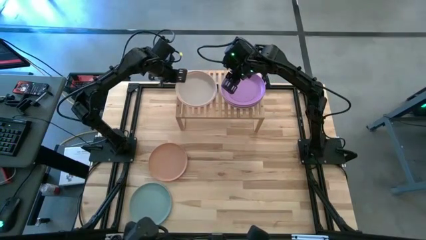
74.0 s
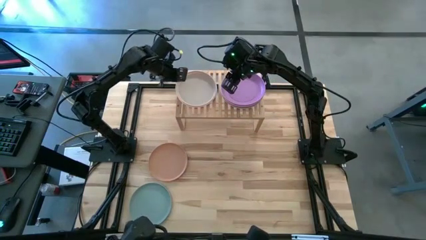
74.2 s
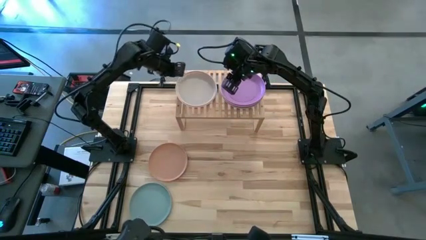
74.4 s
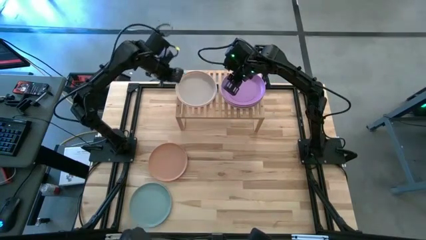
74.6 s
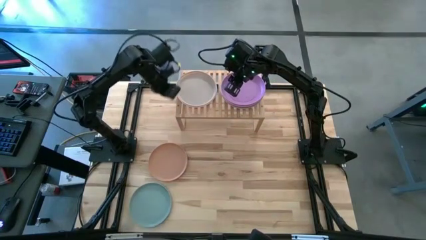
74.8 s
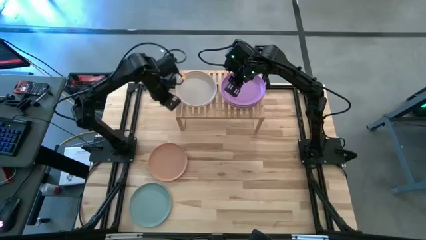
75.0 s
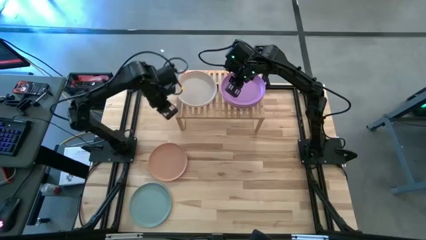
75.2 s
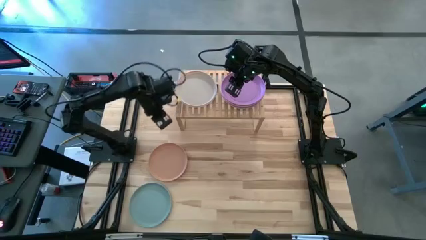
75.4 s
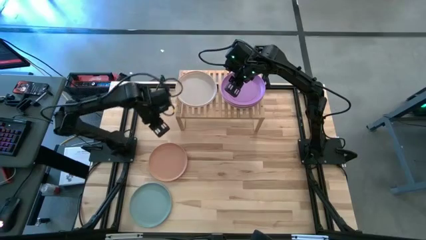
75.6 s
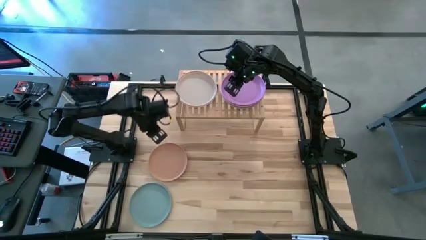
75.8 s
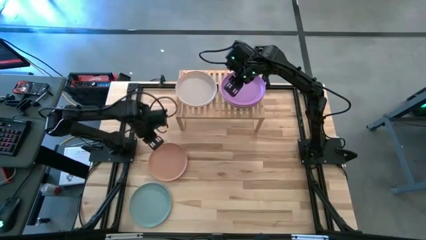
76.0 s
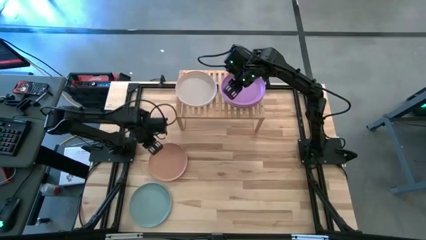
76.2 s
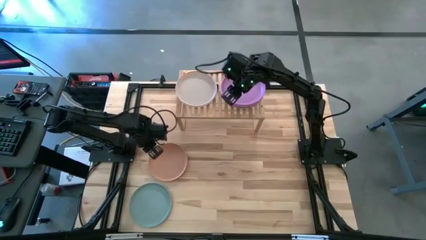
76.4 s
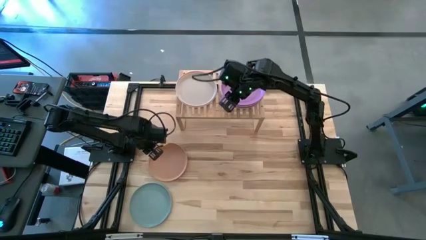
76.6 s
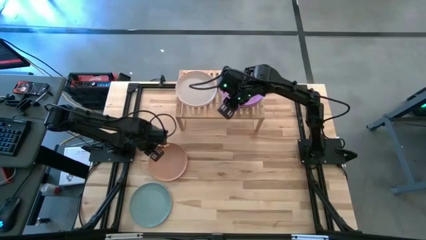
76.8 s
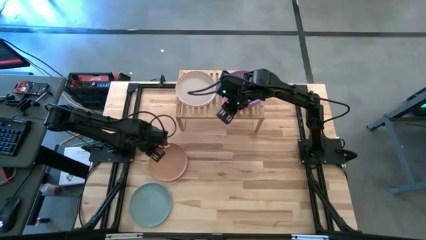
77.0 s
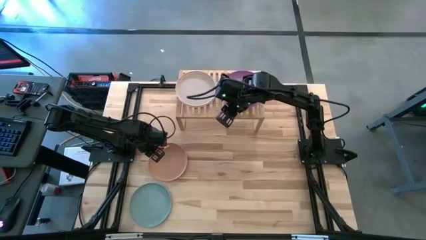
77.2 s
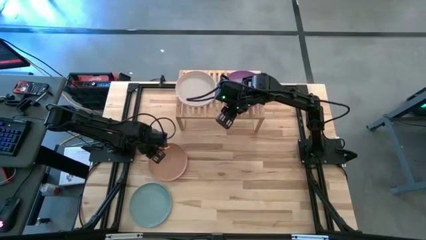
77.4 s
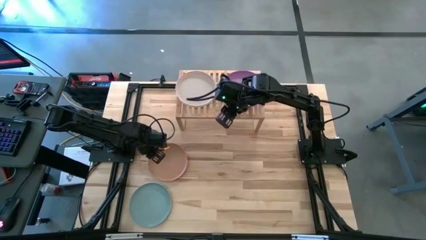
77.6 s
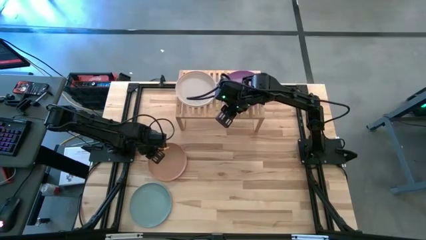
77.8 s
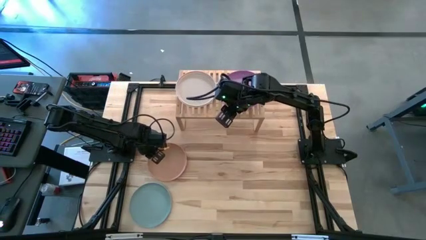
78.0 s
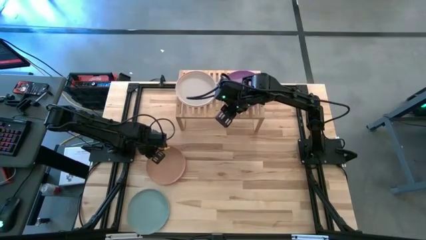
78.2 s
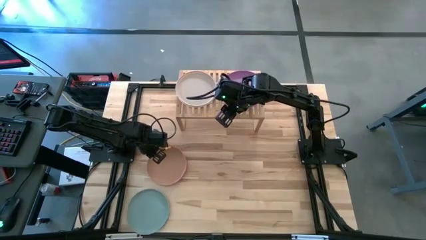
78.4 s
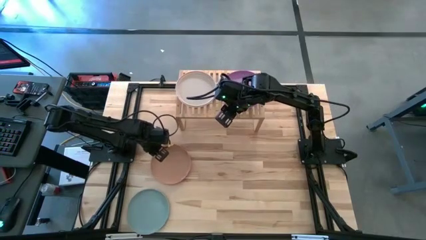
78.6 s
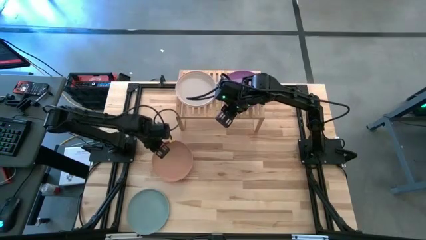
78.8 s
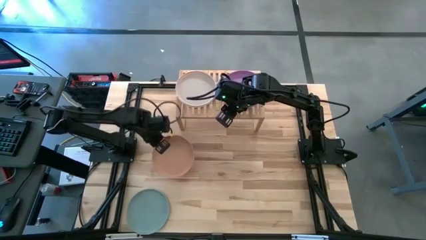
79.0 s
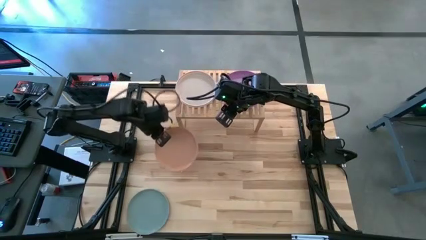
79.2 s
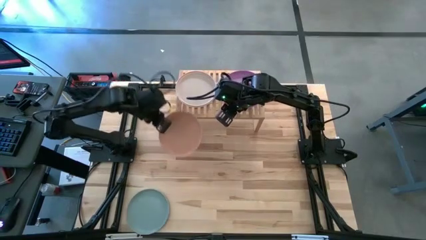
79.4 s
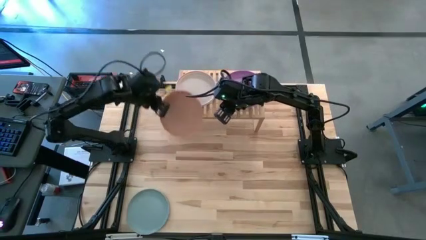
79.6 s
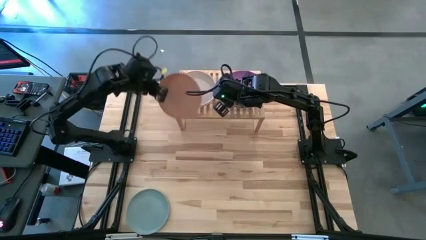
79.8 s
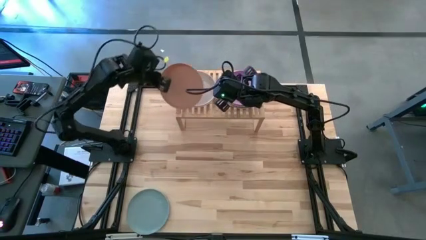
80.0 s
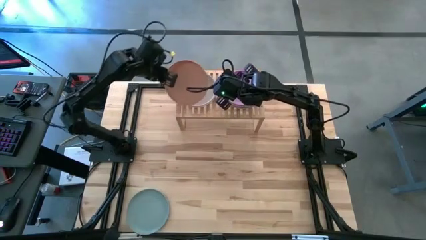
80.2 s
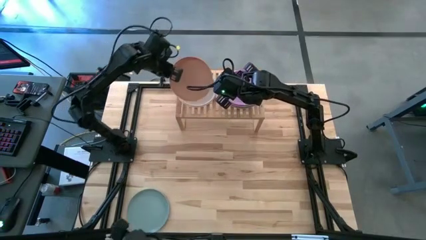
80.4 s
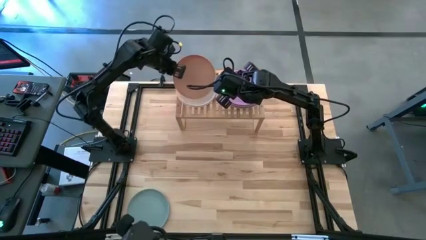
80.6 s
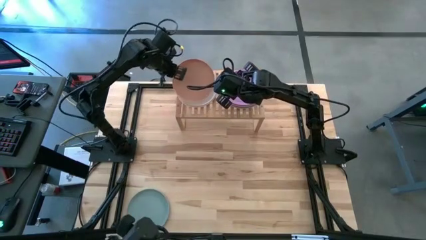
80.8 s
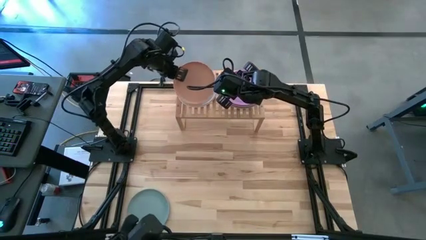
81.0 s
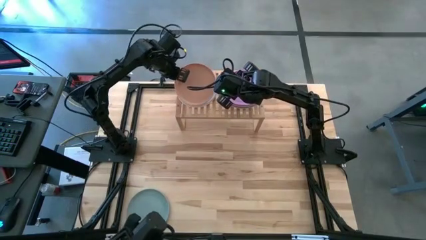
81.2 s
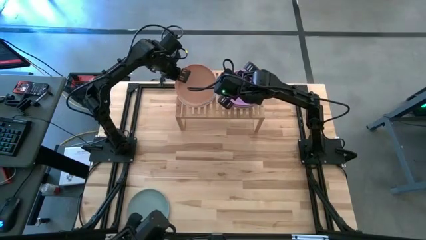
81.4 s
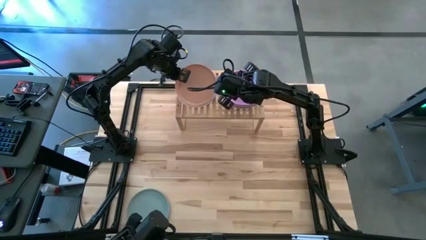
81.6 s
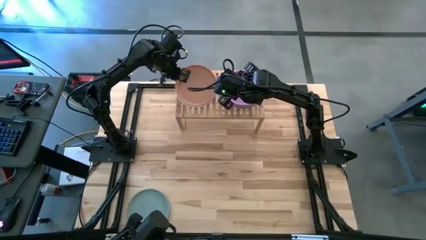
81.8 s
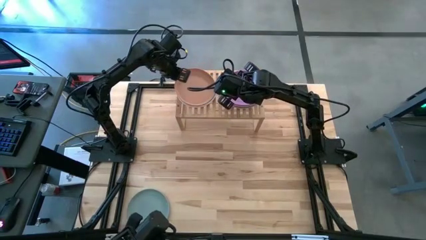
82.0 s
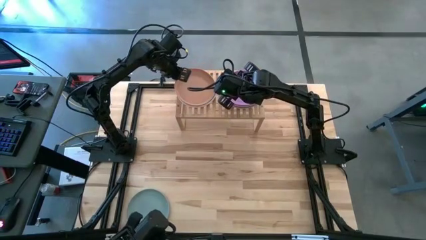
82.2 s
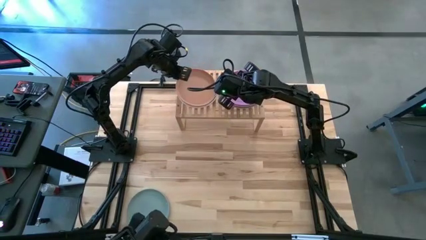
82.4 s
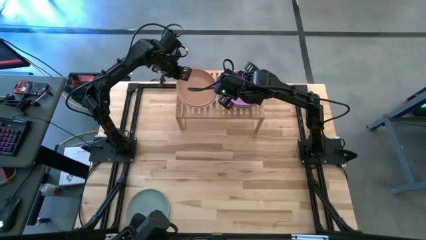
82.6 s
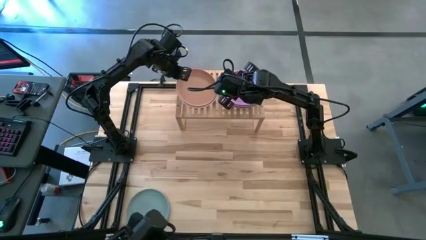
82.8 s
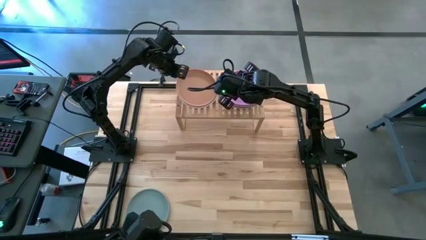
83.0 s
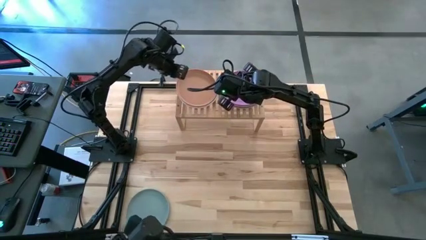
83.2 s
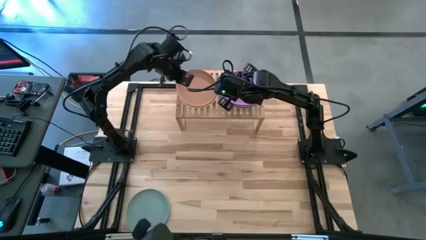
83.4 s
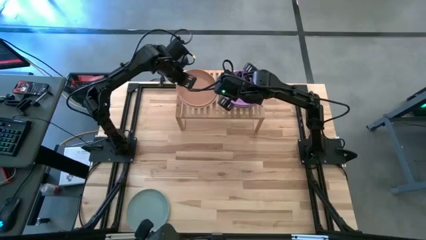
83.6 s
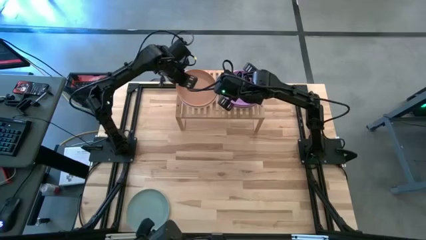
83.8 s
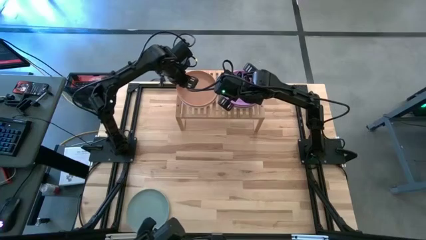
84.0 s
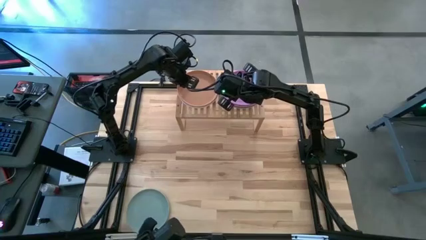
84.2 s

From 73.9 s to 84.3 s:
Task: Place and stack plates onto a shelf
Stack the brown plate on top of the gray plate on the shelf

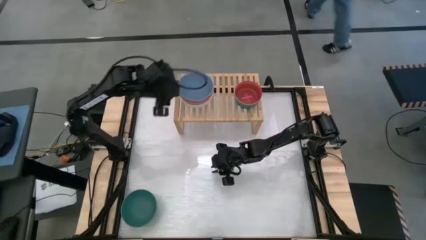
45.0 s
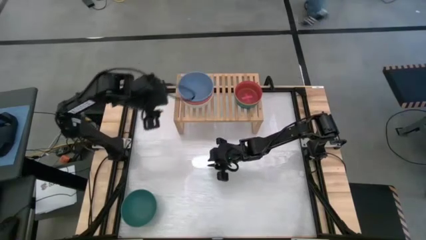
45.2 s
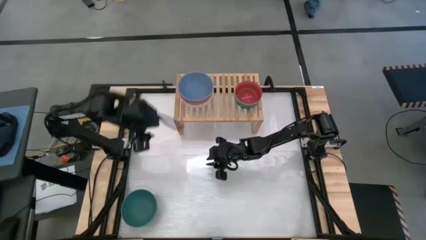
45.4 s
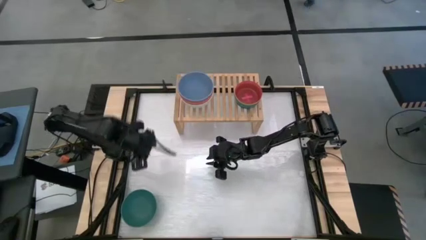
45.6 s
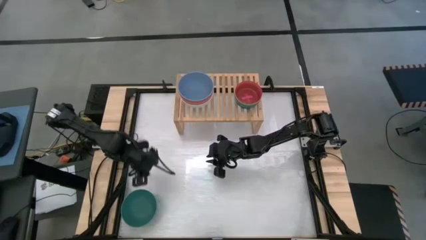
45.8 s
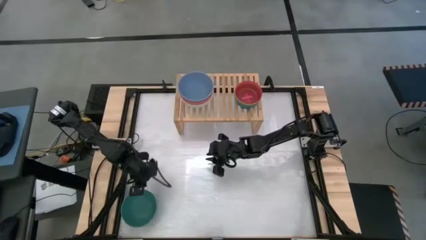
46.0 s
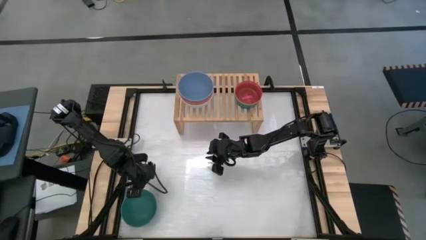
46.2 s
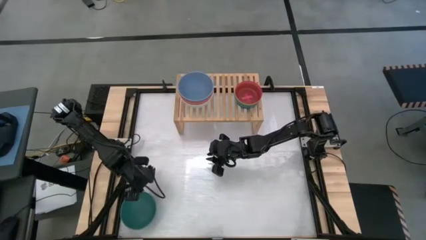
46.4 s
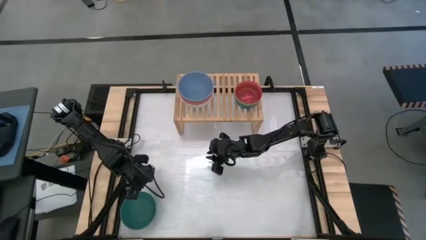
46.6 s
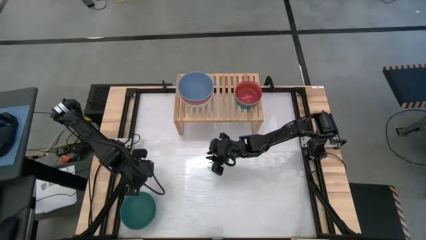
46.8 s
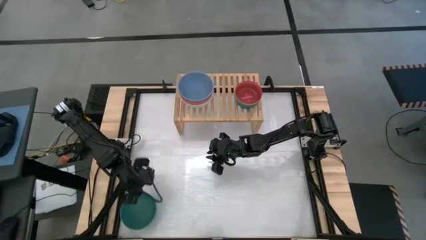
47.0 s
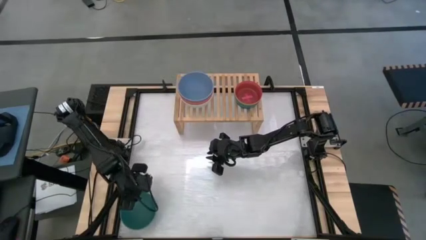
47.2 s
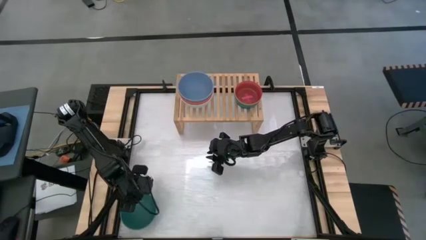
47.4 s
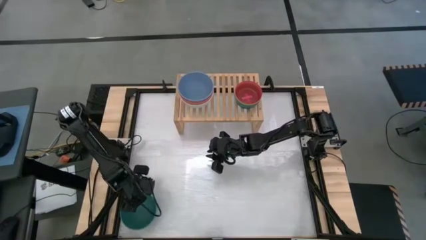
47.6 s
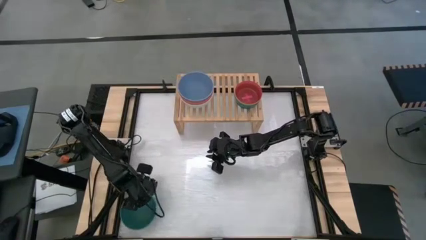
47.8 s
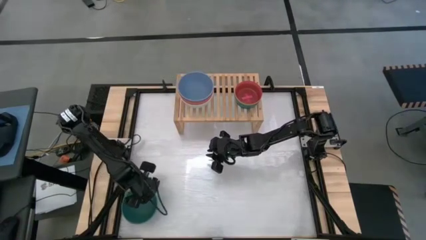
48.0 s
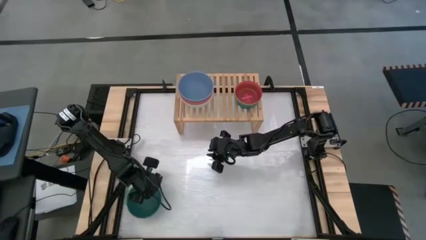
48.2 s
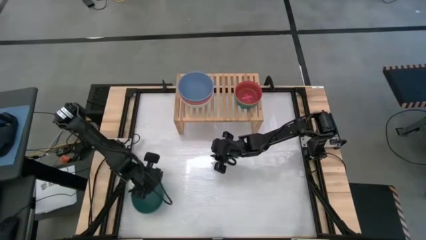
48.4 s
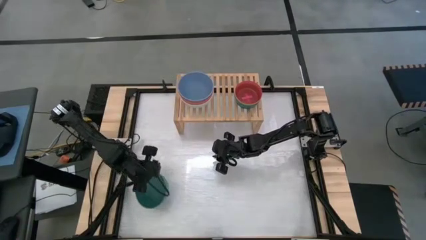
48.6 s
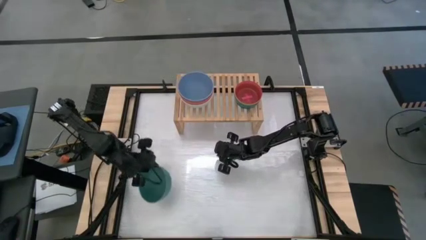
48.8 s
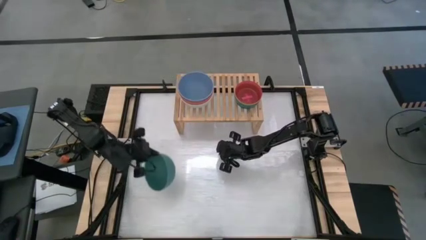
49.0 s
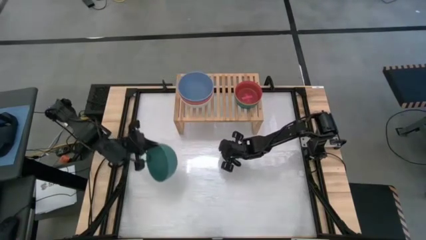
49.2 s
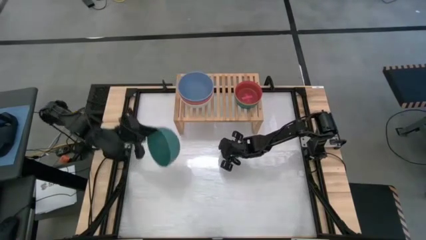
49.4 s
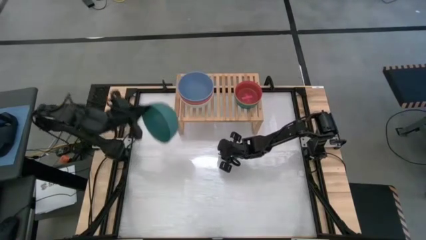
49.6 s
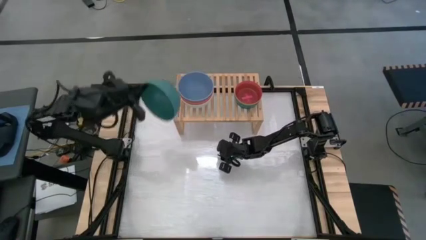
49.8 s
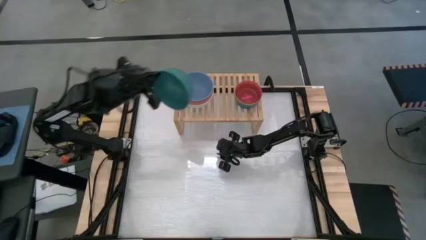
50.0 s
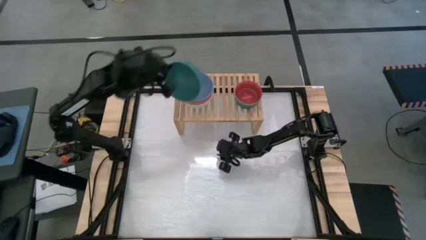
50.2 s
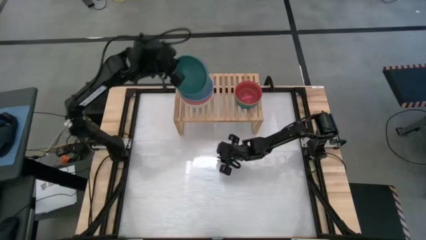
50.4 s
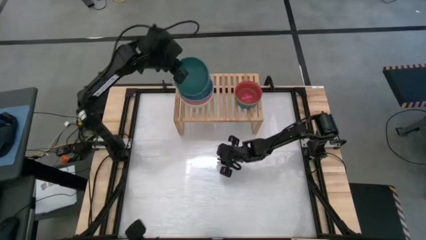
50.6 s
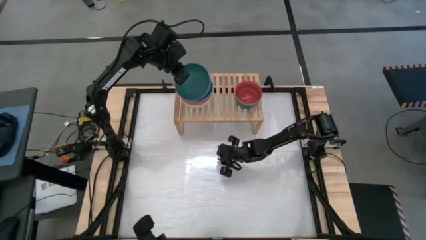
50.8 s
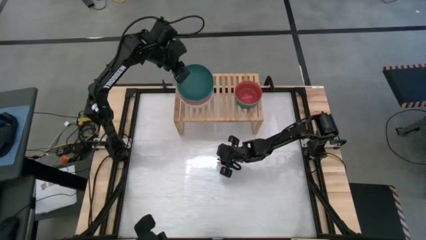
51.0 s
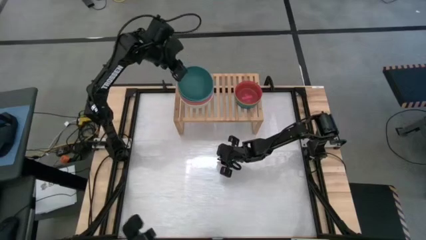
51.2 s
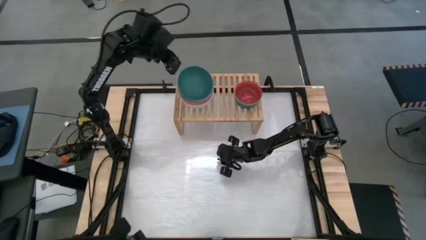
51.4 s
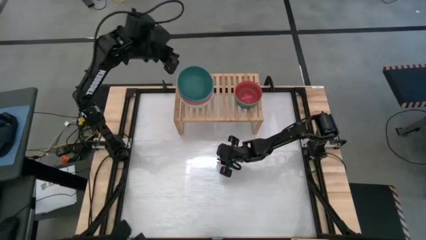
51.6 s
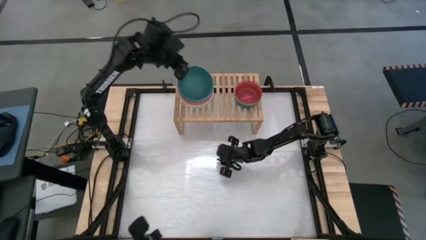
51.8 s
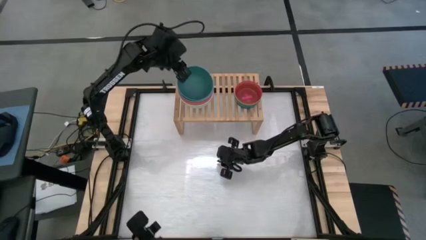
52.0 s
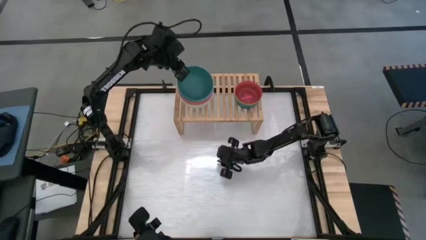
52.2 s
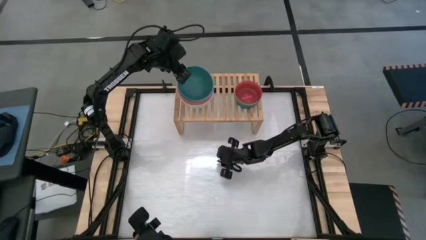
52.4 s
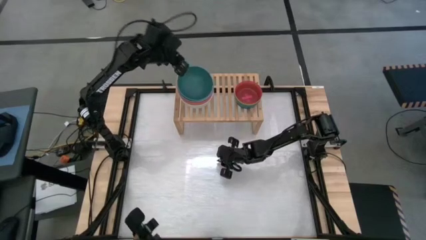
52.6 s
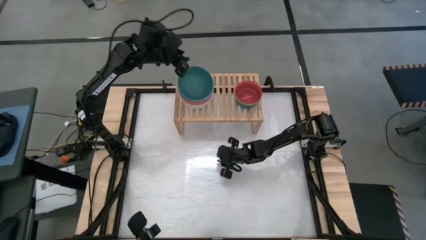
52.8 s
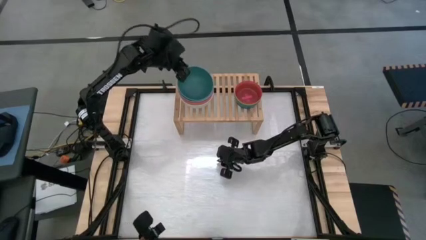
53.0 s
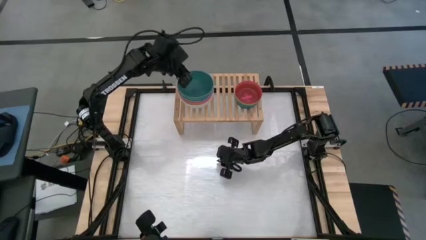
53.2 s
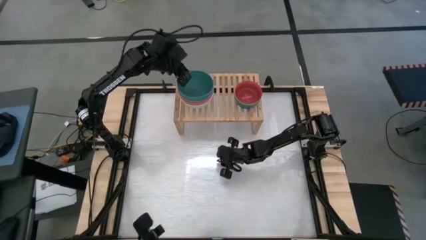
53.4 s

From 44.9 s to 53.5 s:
Task: Place and stack bowls onto a shelf
Stack the green bowl on top of the blue bowl
